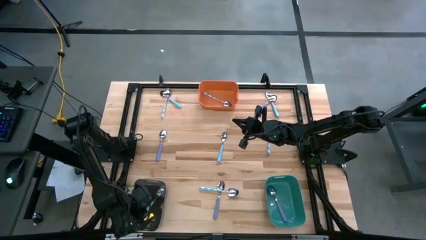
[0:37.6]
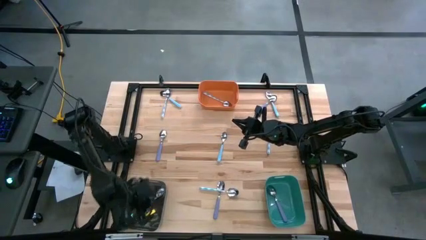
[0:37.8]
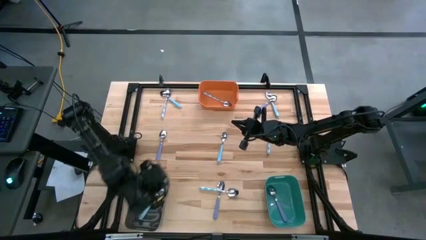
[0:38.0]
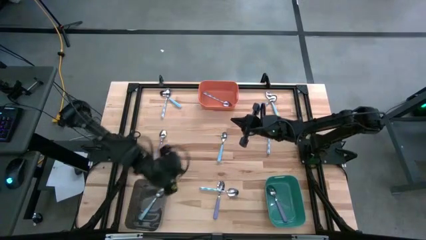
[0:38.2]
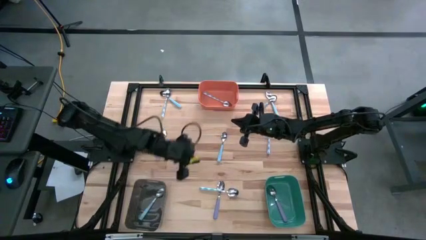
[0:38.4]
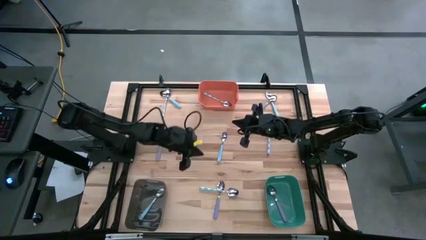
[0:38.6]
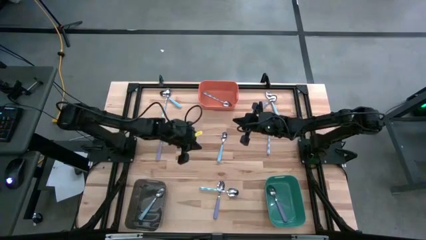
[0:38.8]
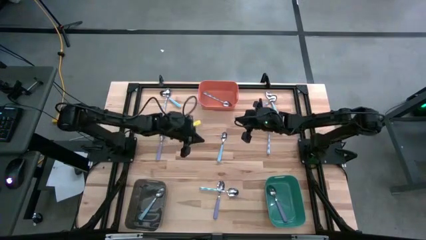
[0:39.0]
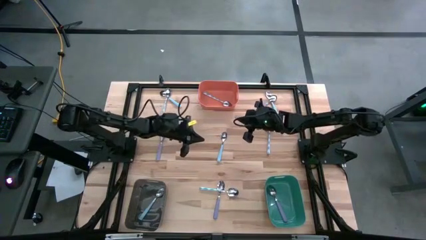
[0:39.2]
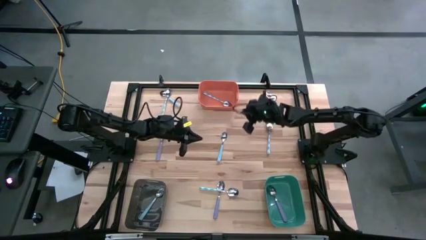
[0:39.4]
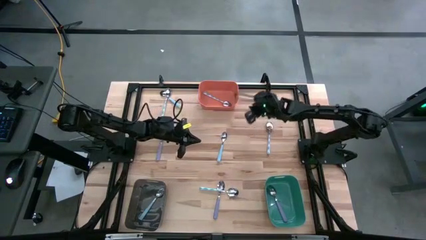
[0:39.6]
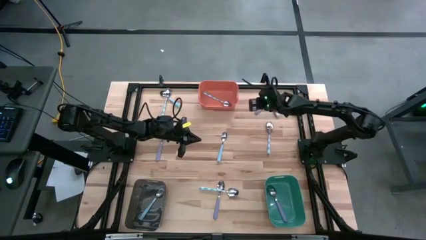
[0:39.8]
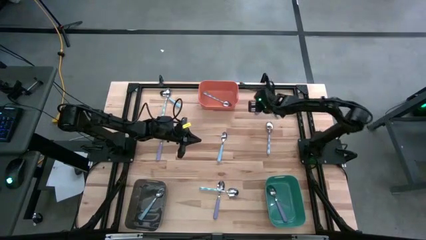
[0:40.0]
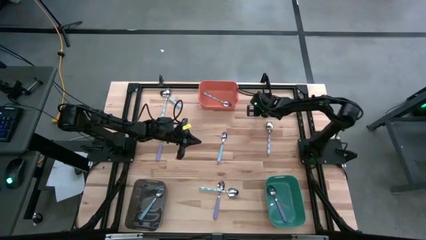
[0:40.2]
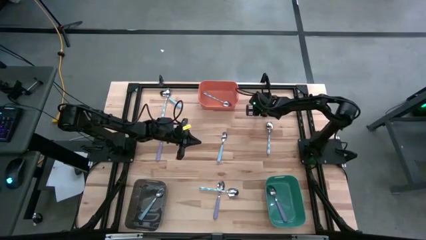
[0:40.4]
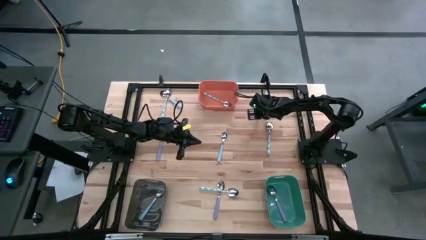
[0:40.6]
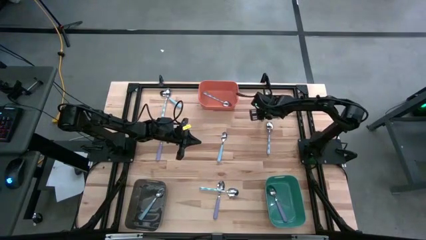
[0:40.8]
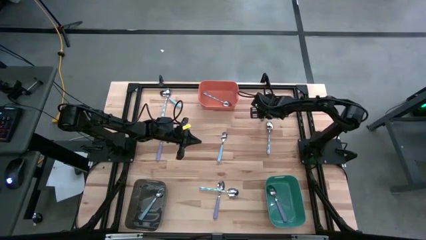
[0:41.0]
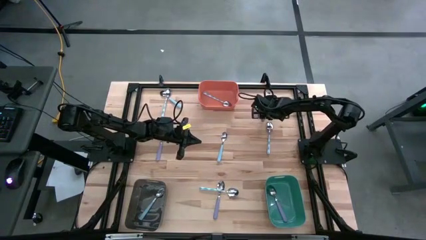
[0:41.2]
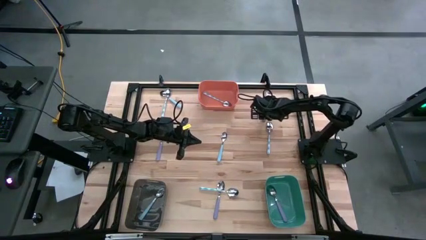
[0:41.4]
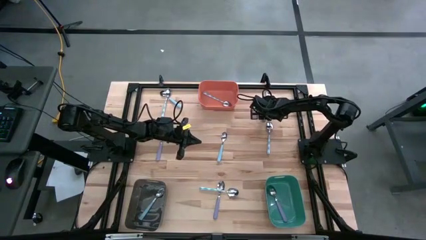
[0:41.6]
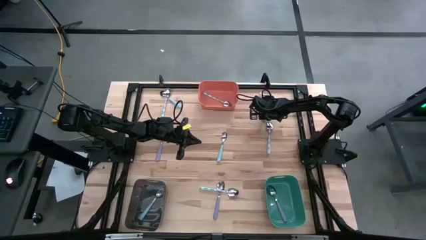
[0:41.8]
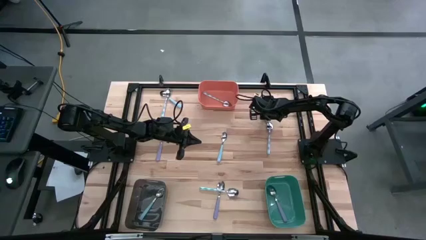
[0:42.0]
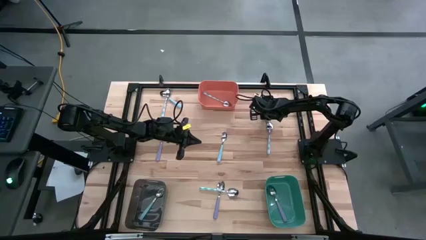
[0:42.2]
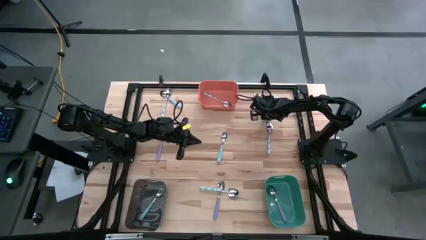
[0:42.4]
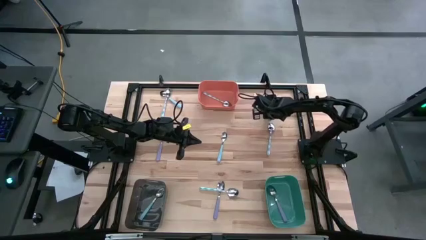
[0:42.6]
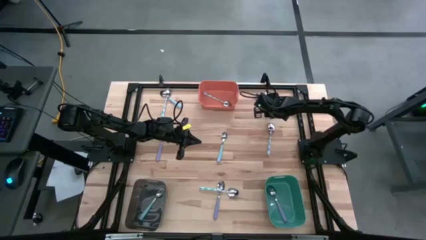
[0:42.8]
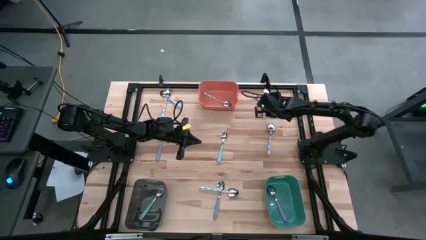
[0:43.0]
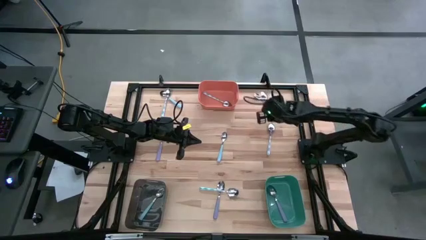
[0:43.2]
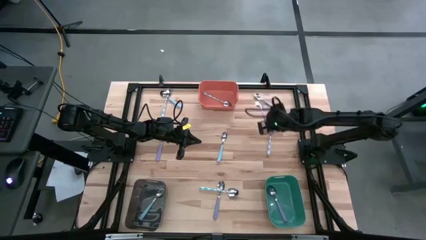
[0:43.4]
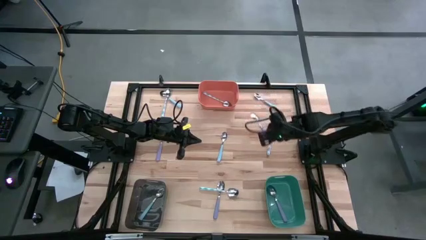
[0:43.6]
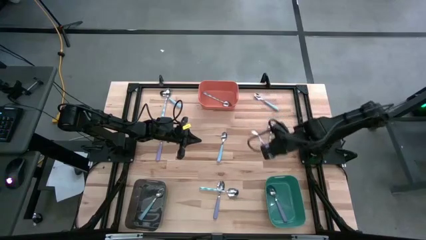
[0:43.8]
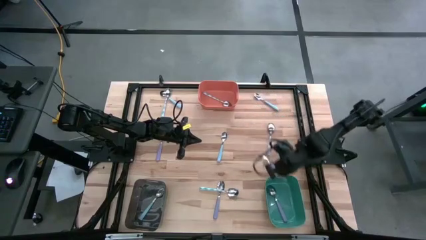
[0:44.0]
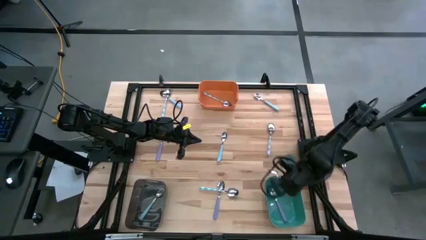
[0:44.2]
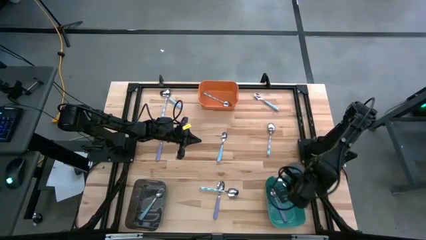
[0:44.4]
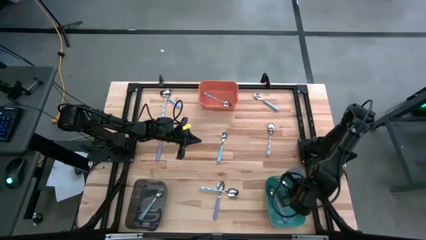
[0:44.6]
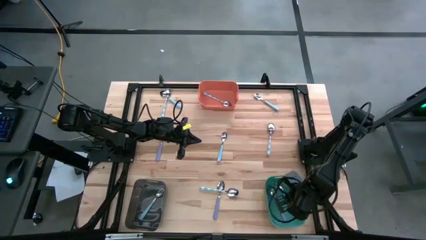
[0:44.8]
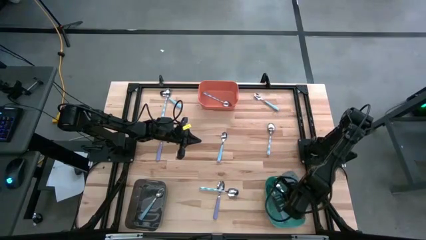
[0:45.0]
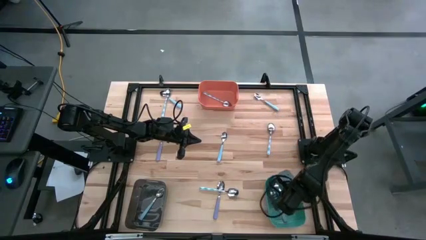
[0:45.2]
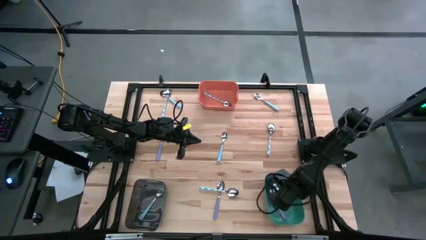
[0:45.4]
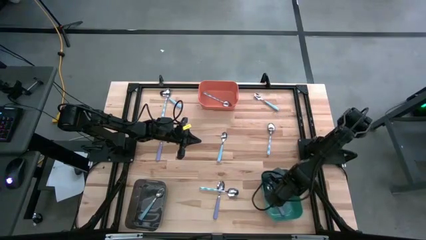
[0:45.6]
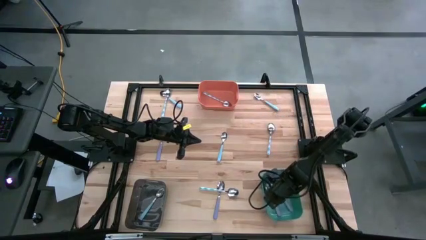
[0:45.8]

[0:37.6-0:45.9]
Task: Sort silverware by color (type)
Put the top right violet spoon into the green bin

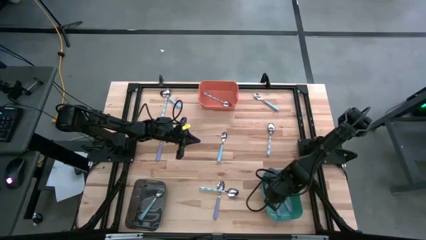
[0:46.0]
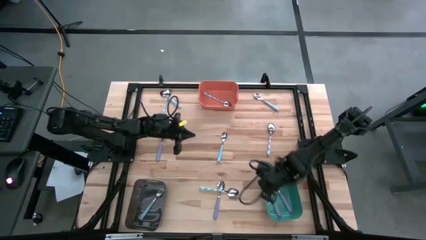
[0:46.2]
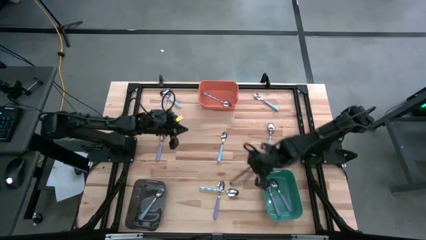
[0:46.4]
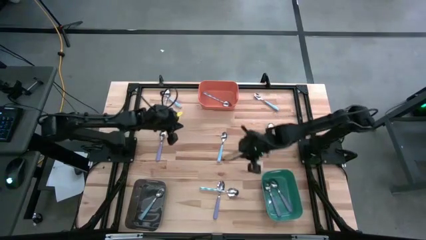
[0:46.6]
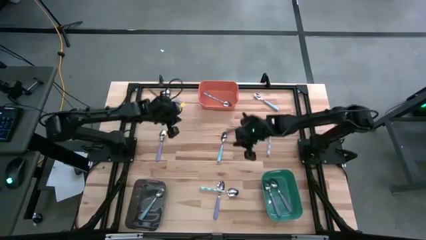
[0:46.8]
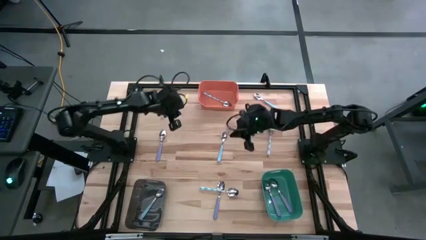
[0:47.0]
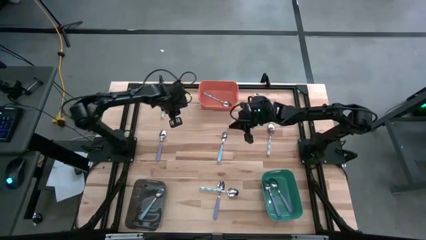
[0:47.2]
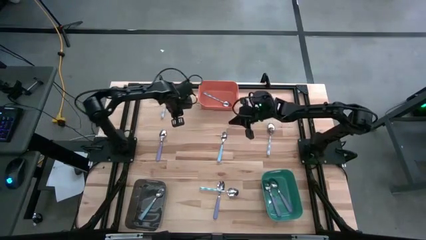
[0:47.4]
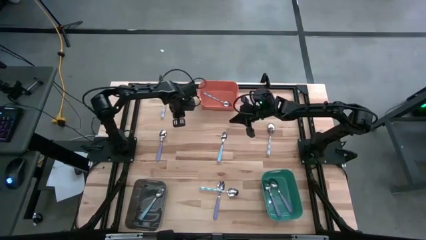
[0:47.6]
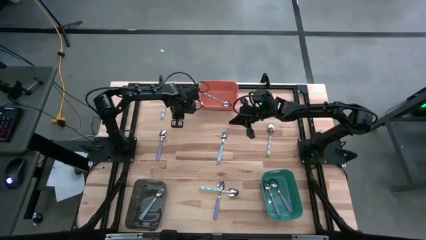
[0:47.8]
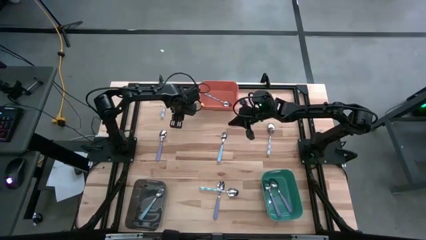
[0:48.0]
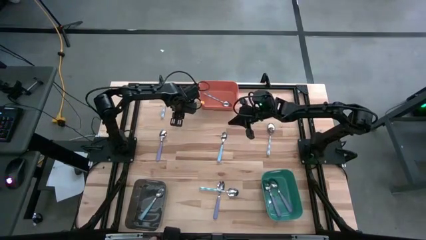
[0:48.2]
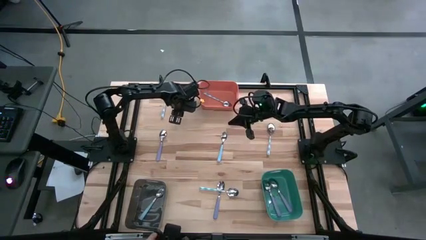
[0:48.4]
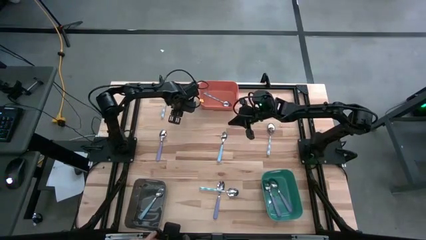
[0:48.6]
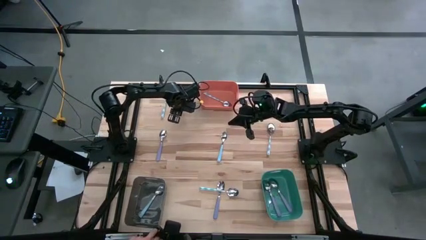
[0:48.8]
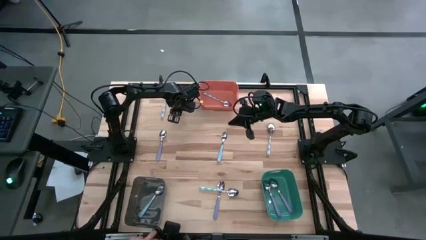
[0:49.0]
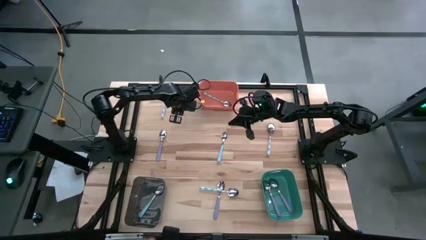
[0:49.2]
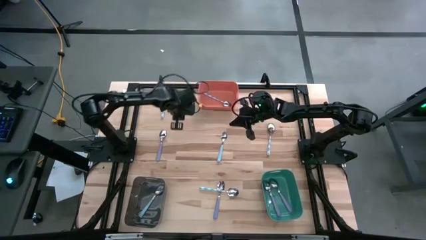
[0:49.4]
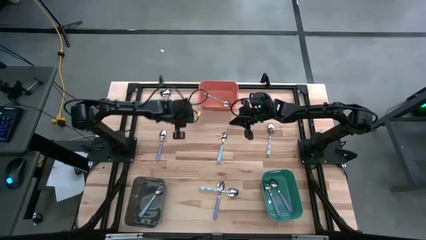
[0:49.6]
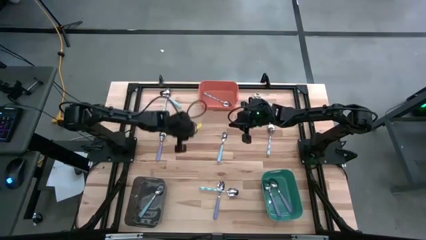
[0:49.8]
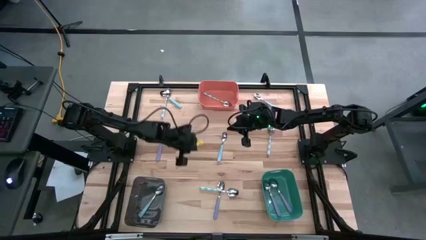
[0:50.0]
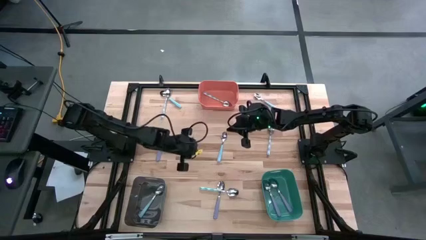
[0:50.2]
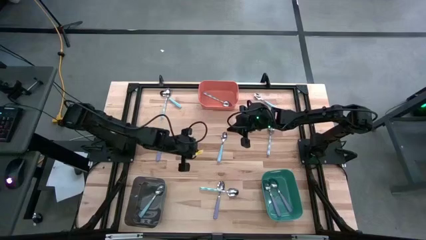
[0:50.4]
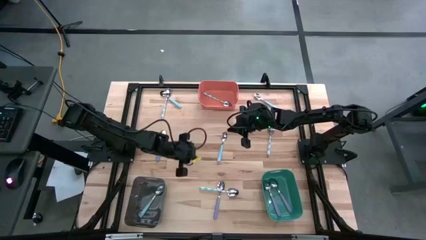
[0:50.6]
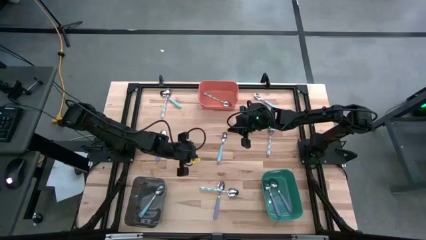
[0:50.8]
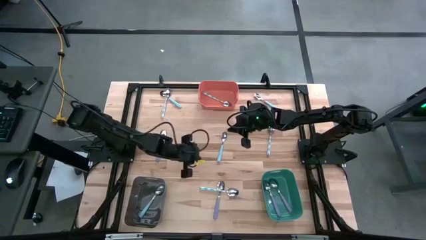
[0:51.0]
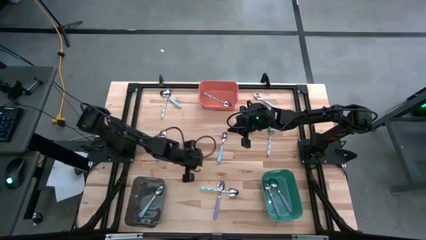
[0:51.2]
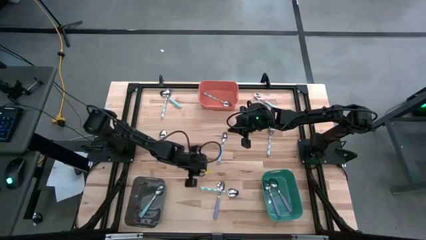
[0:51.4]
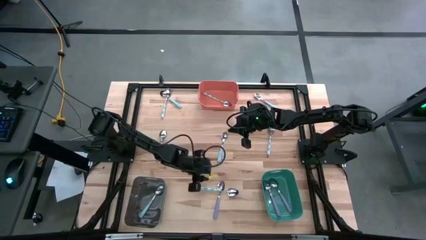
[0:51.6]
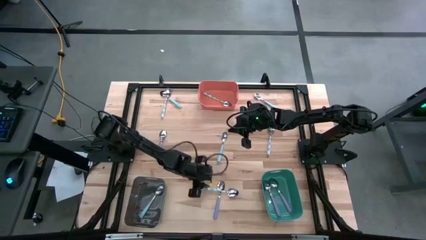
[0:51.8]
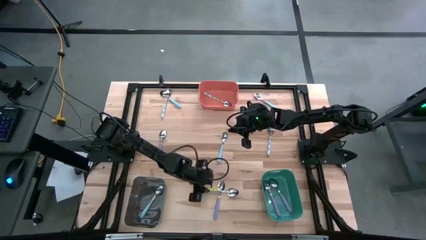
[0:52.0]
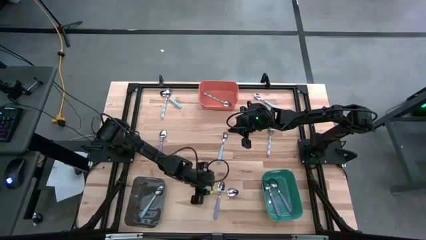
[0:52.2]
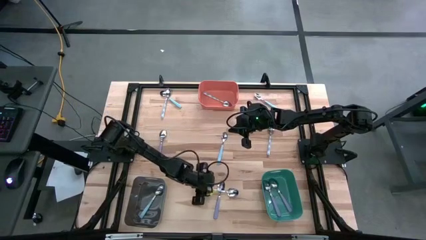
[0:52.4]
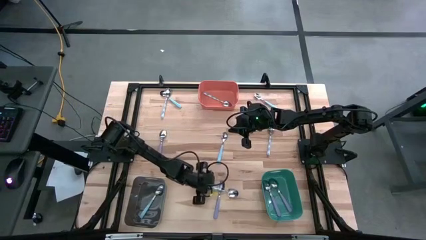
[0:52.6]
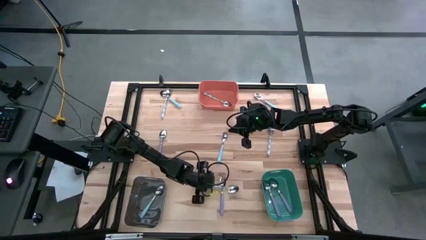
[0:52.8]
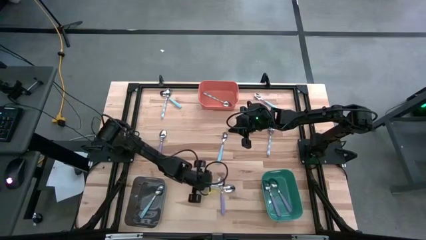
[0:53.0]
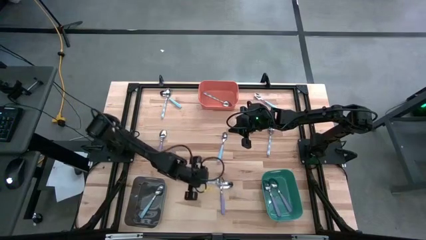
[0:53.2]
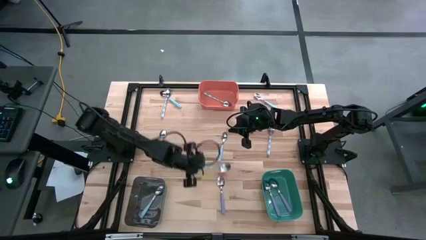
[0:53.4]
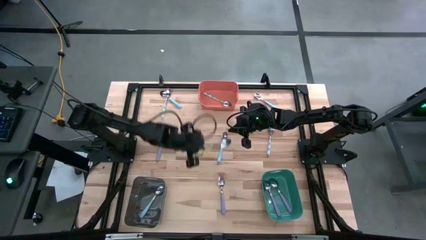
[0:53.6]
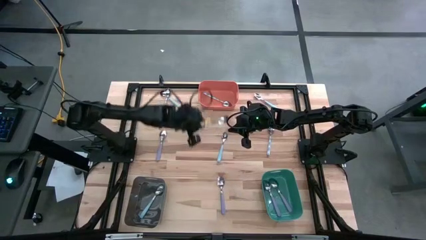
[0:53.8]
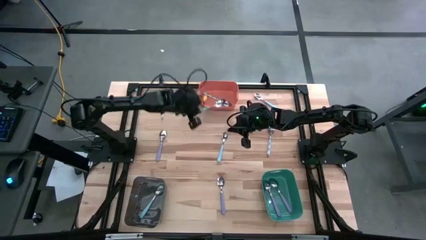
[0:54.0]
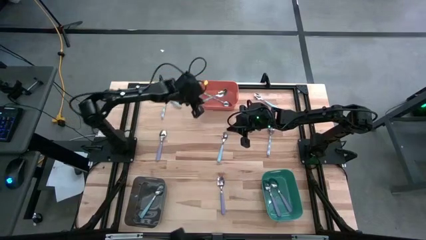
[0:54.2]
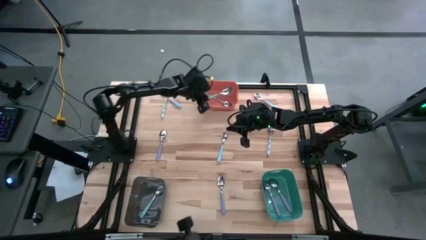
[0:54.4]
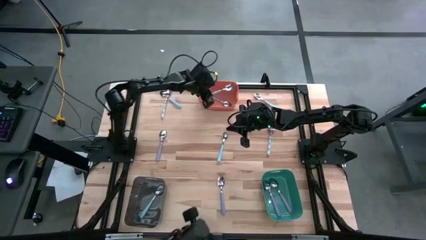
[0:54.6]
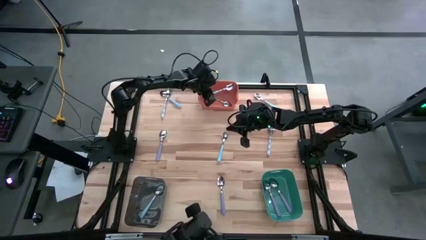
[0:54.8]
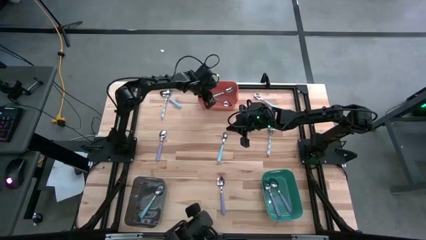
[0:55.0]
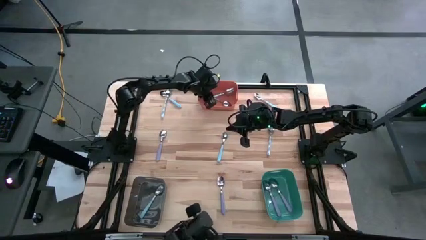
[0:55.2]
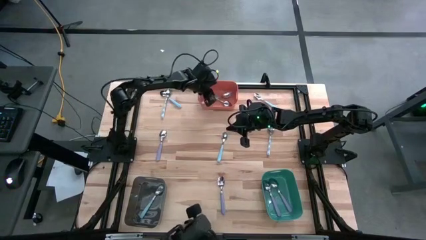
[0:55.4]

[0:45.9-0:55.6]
Put the bottom blue and white spoon into the orange bin
